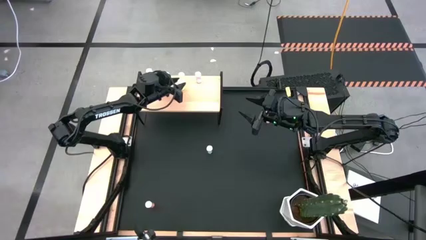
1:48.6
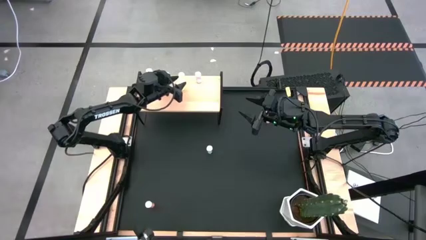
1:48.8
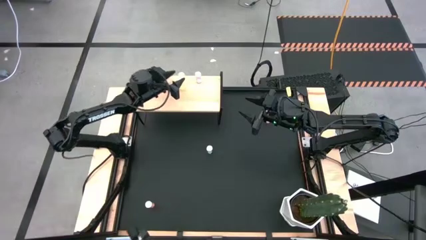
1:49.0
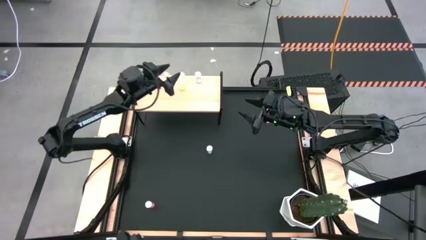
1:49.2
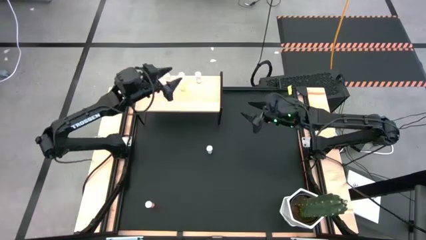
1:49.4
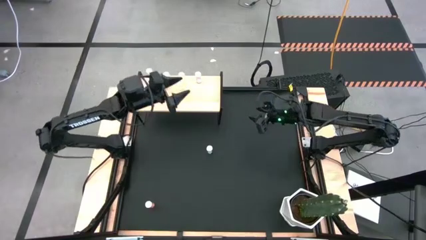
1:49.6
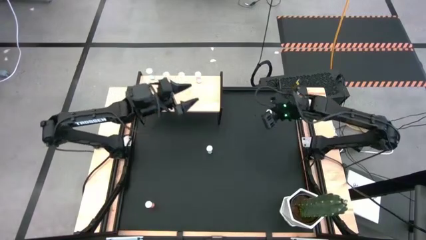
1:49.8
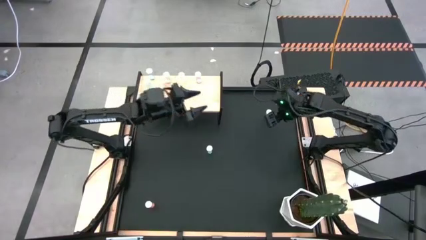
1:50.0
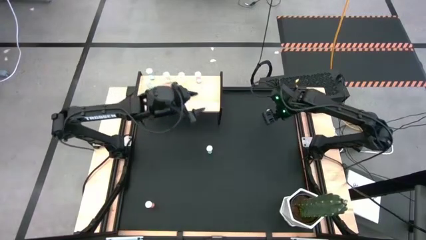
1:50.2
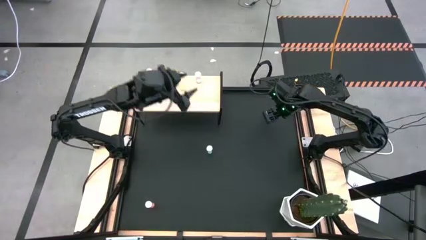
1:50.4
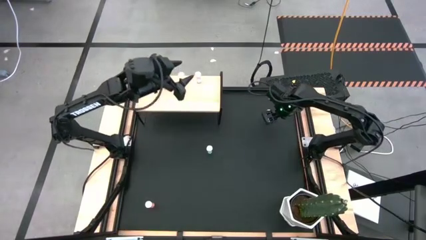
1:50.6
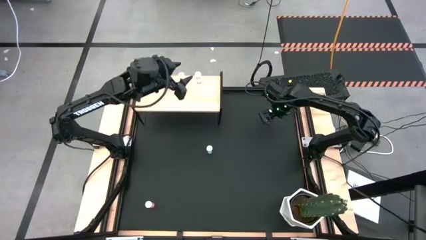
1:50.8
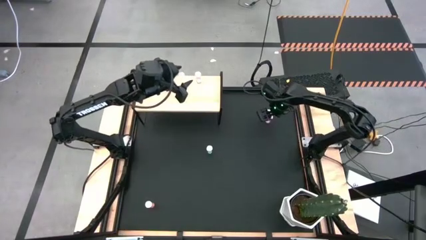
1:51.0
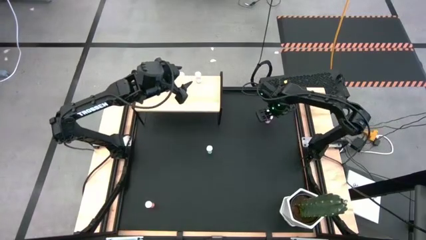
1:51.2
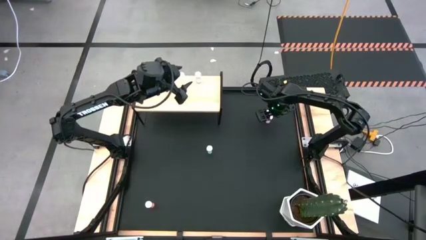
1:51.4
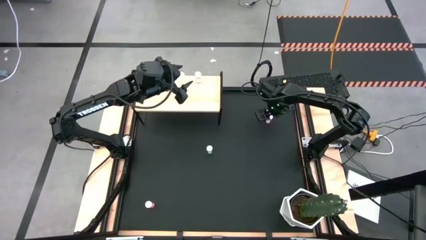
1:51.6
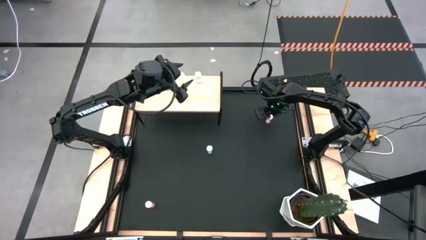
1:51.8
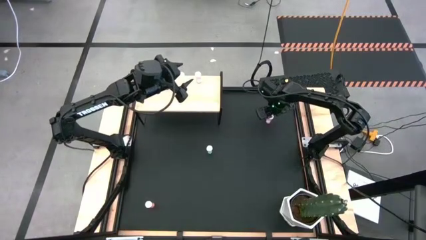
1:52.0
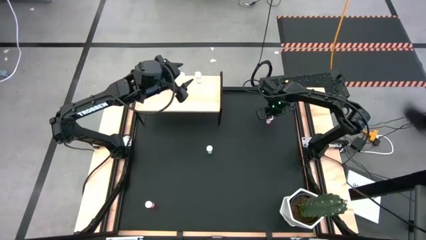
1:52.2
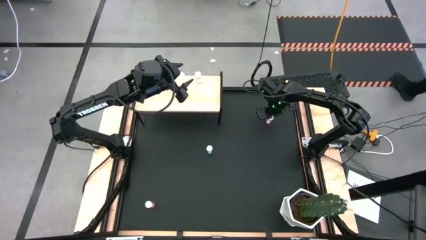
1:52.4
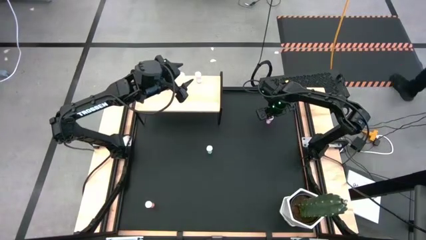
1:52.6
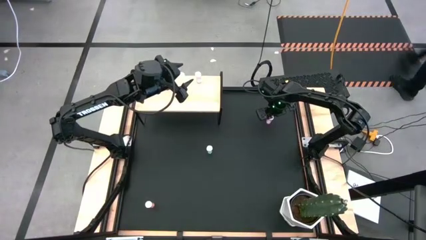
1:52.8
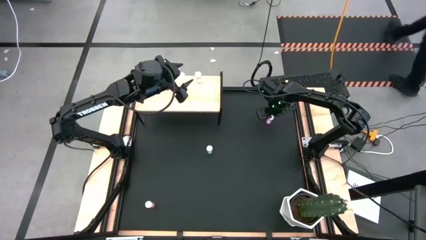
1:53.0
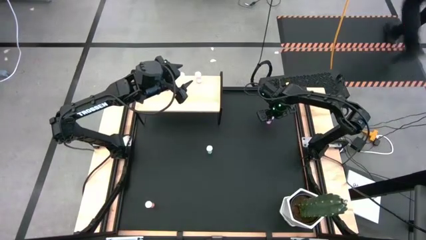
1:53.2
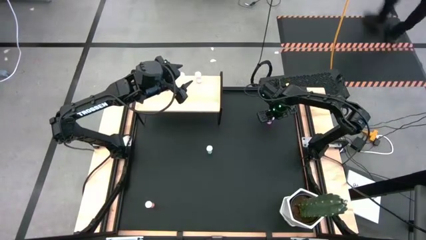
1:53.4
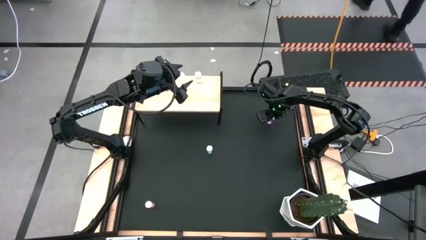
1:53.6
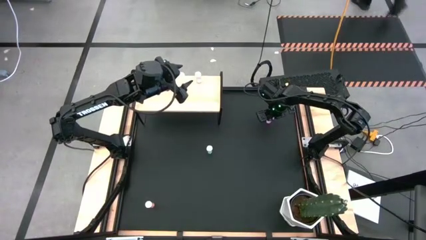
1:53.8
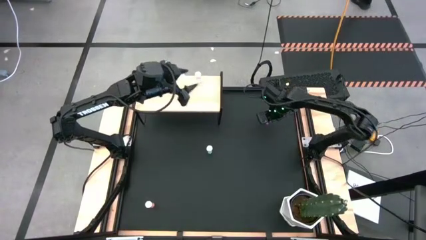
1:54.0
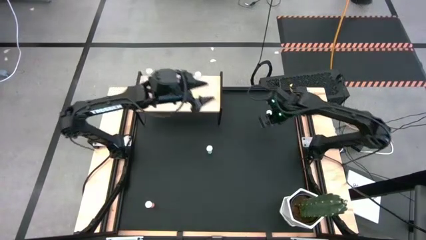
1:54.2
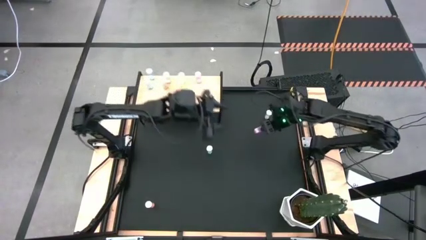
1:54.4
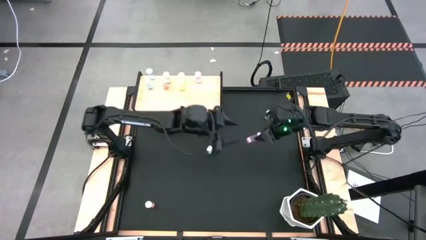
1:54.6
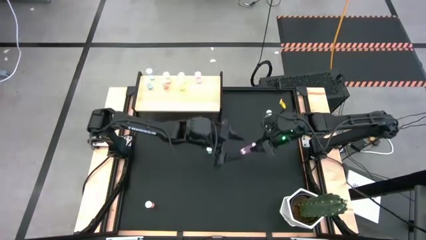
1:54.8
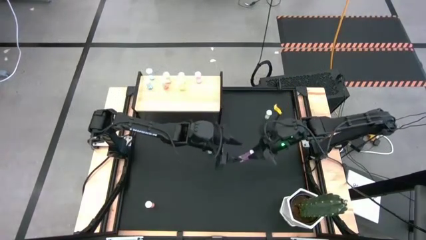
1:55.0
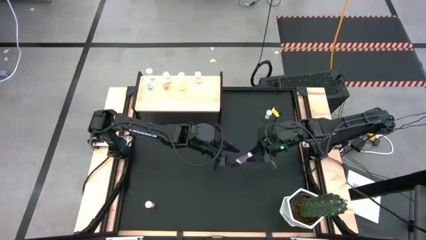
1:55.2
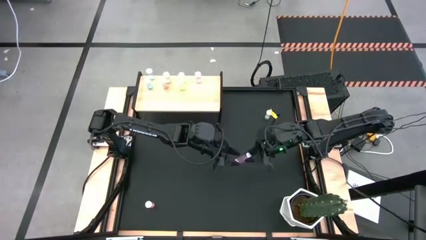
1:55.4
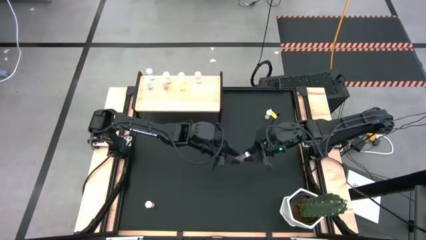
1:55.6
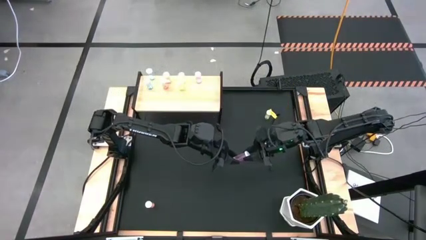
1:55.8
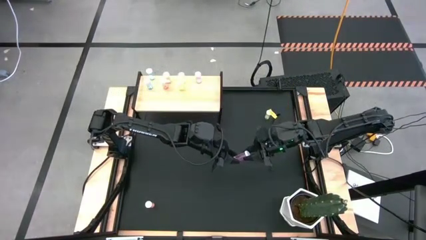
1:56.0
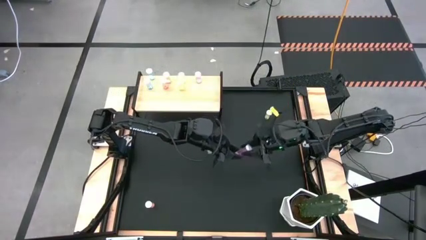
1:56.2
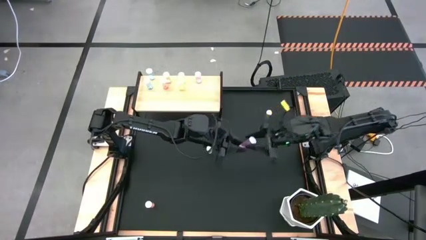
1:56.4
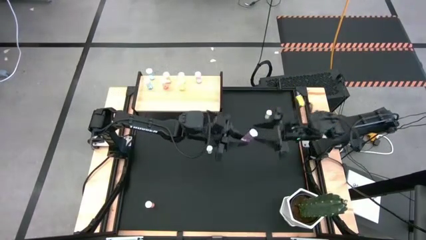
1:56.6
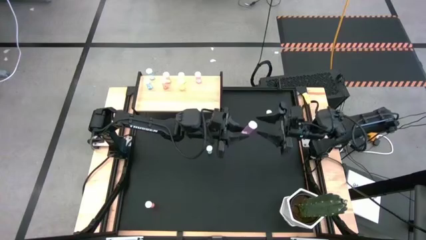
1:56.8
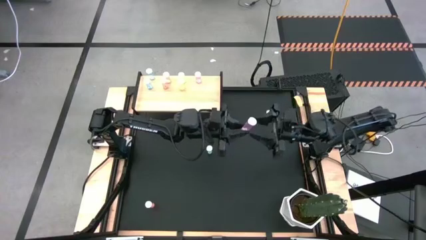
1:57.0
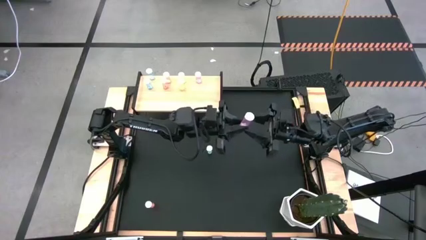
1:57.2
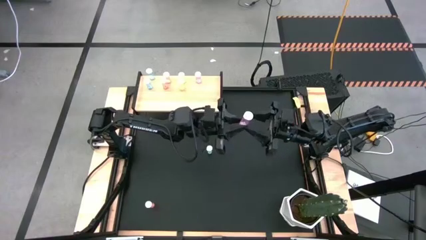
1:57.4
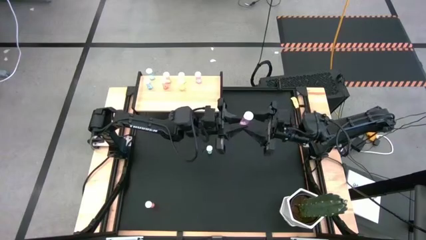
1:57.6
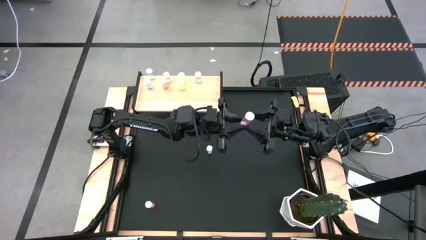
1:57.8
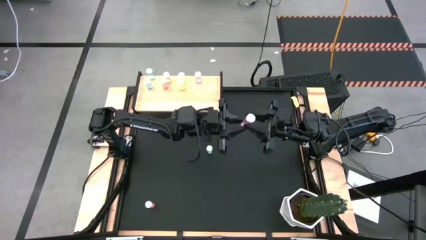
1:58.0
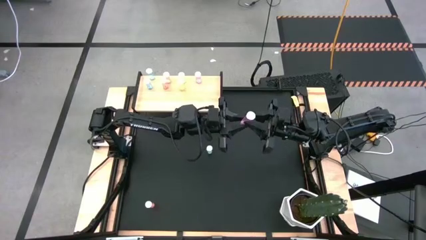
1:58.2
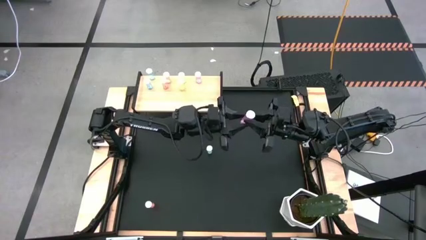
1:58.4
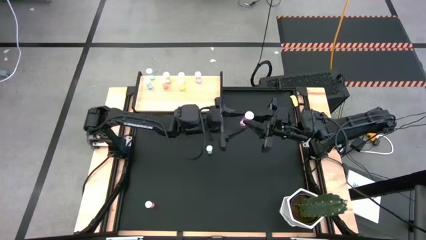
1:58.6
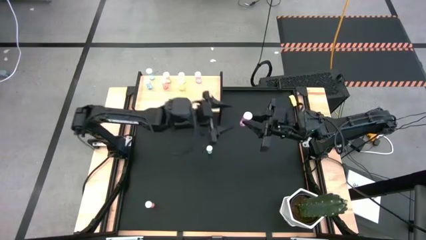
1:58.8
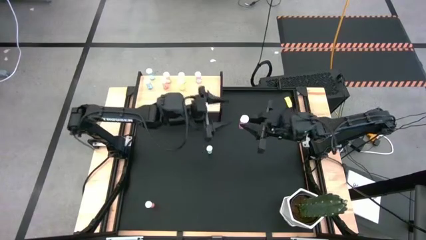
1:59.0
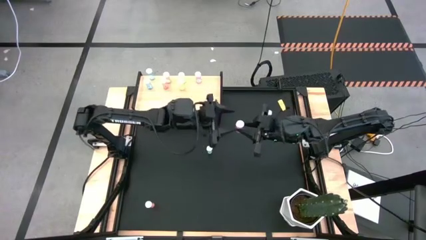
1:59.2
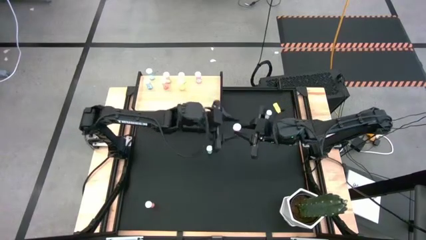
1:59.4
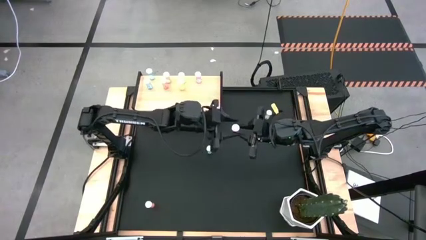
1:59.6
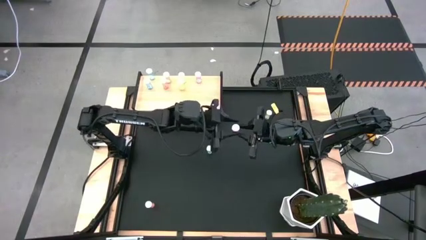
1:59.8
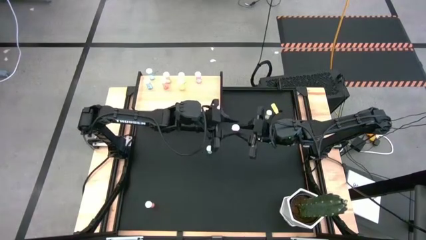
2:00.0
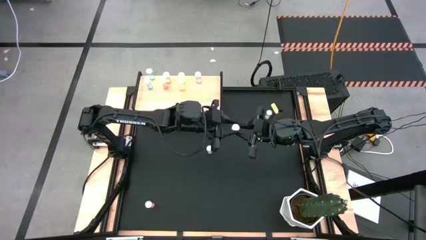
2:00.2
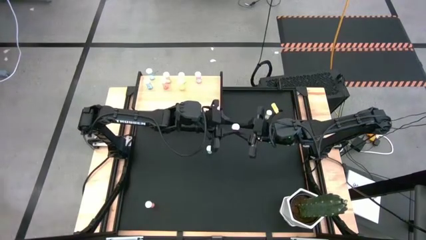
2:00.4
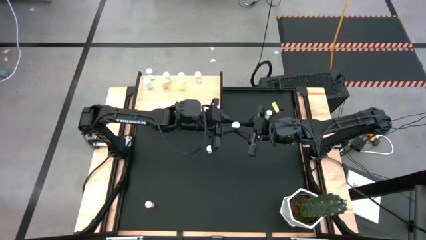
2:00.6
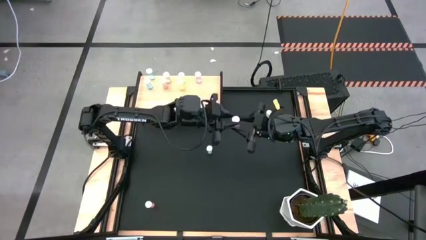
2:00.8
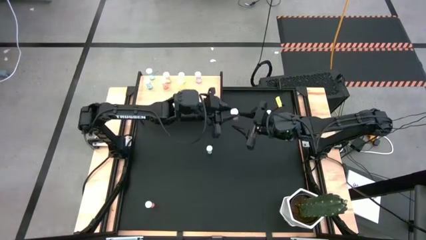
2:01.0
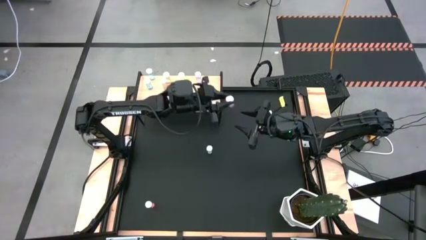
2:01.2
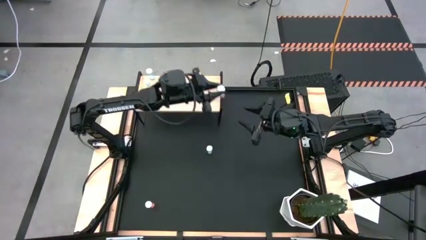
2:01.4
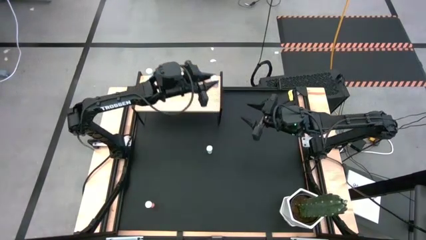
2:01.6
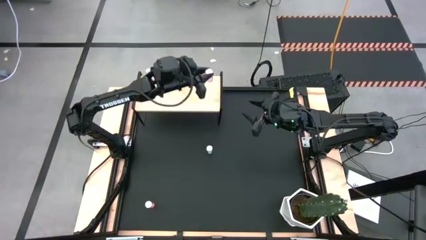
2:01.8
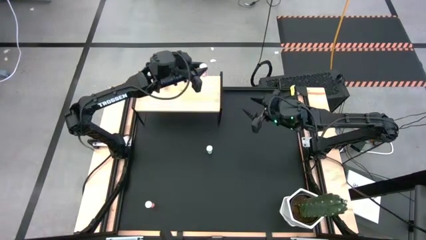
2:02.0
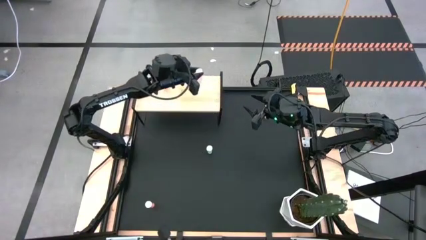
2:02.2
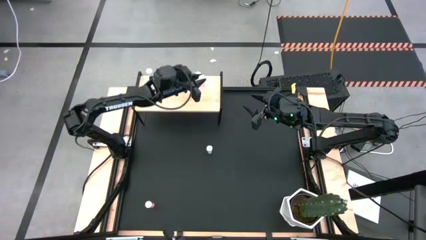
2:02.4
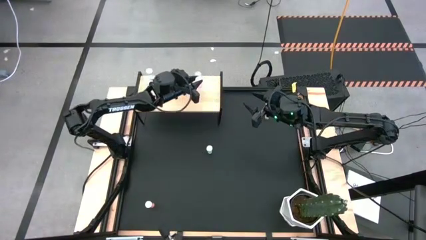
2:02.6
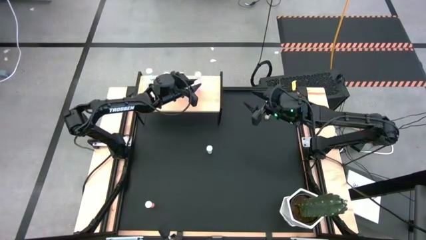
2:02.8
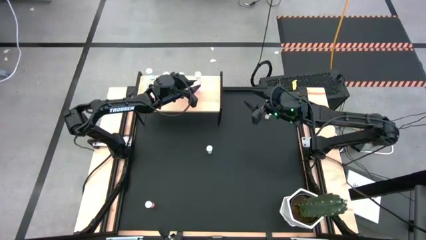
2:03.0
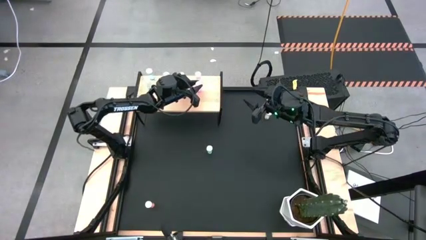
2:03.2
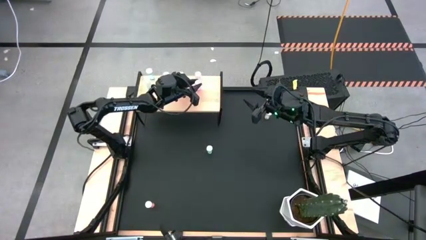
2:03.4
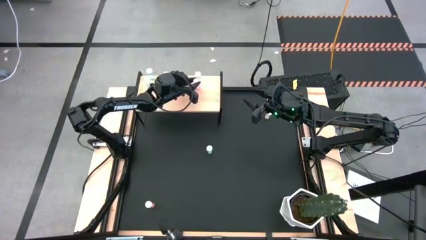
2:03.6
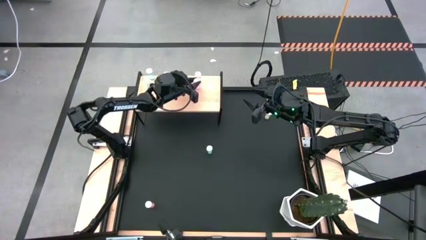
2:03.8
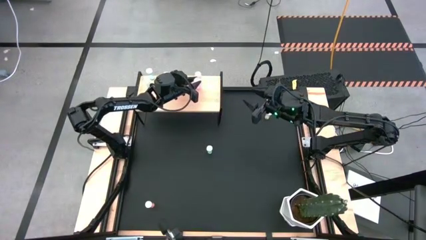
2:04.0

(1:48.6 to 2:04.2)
Task: Pick and place medicine bottles onto shelf by color
Put the pink pill bottle on the shelf aligned with the pink pill bottle
